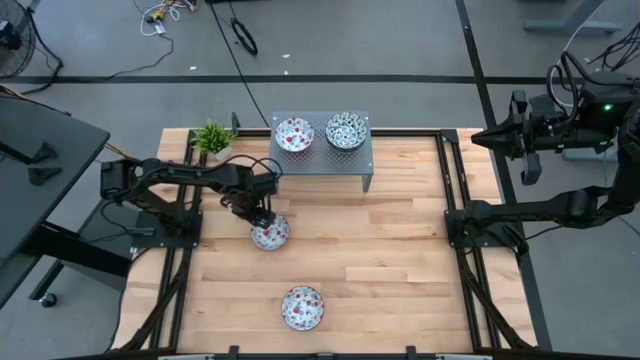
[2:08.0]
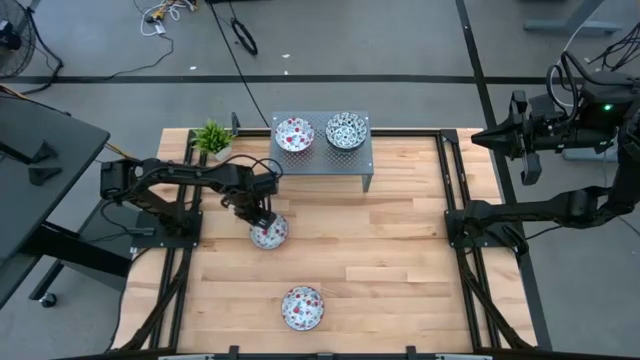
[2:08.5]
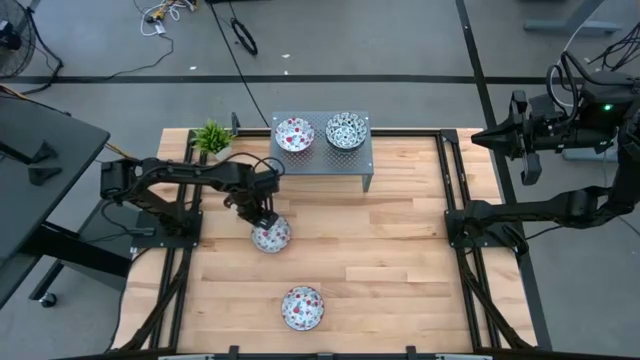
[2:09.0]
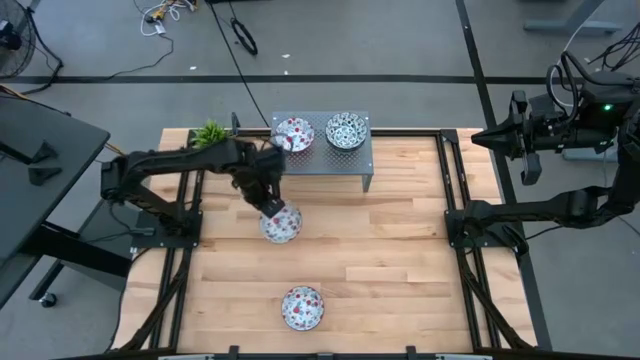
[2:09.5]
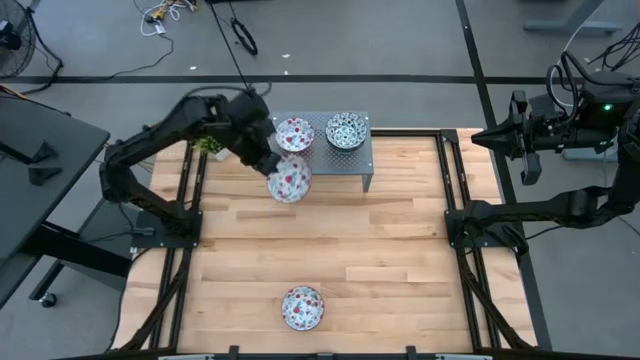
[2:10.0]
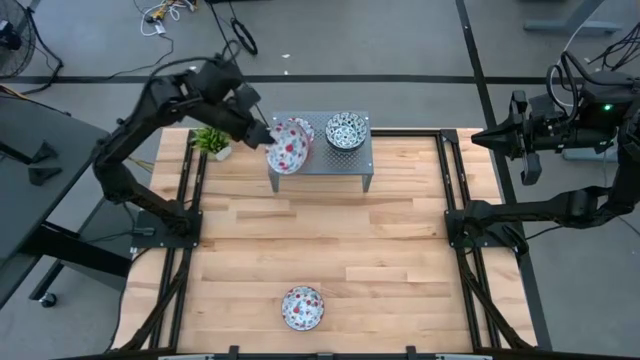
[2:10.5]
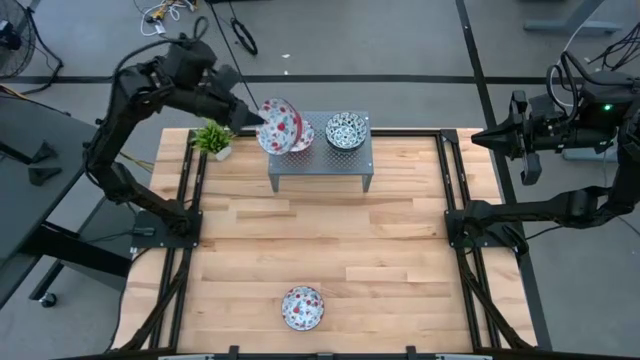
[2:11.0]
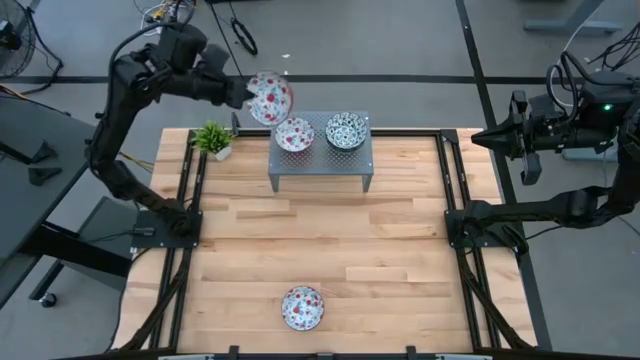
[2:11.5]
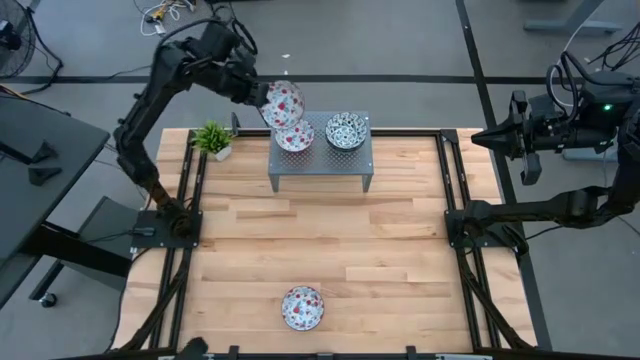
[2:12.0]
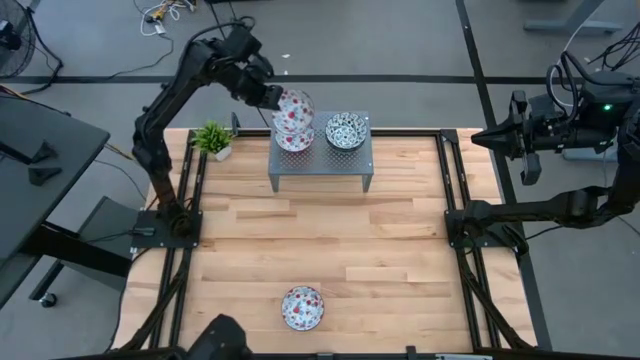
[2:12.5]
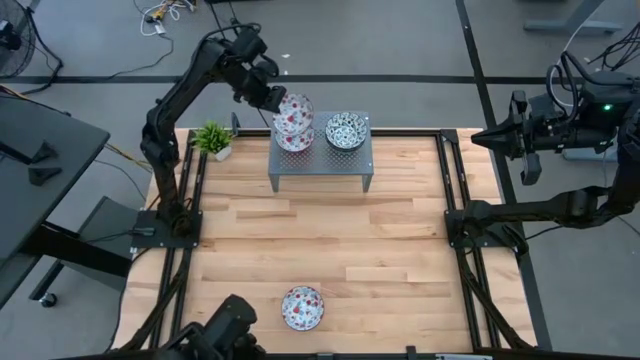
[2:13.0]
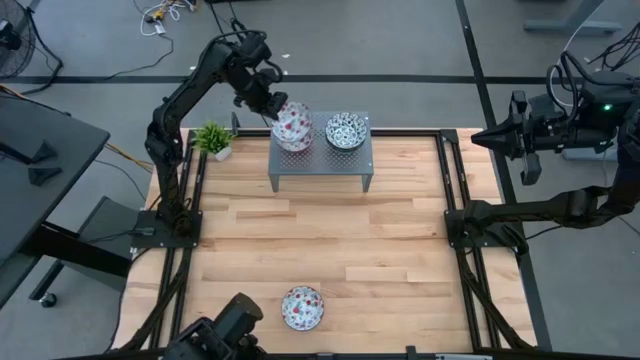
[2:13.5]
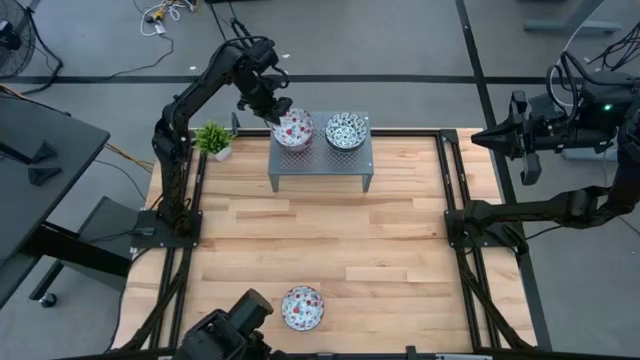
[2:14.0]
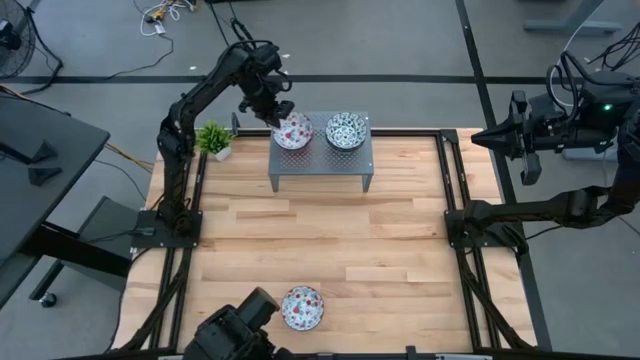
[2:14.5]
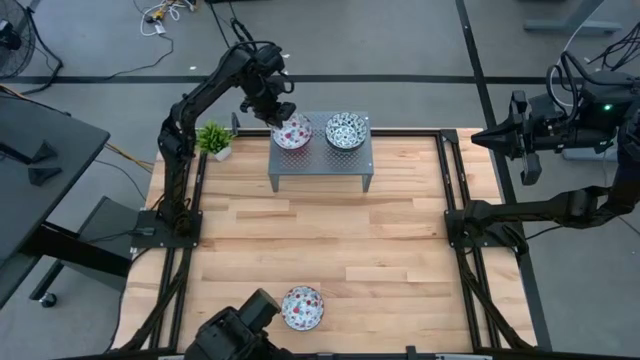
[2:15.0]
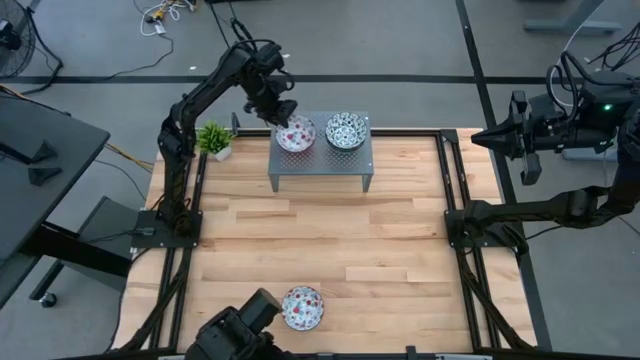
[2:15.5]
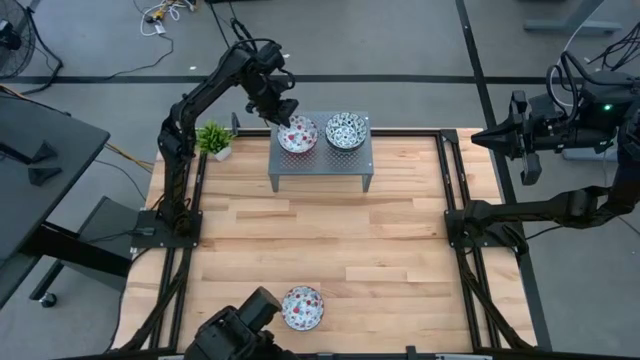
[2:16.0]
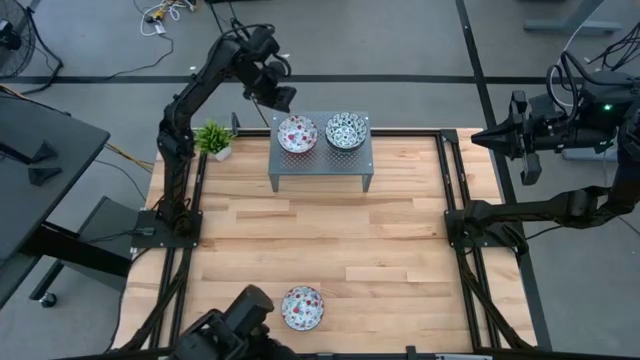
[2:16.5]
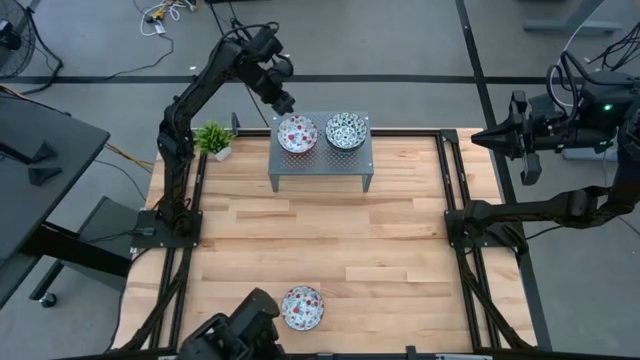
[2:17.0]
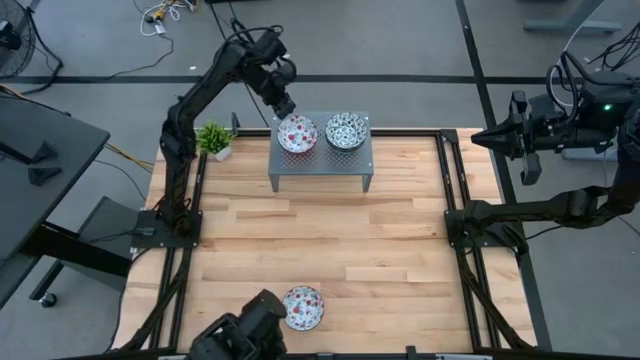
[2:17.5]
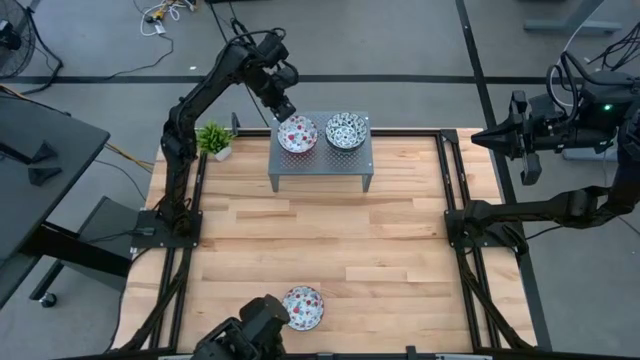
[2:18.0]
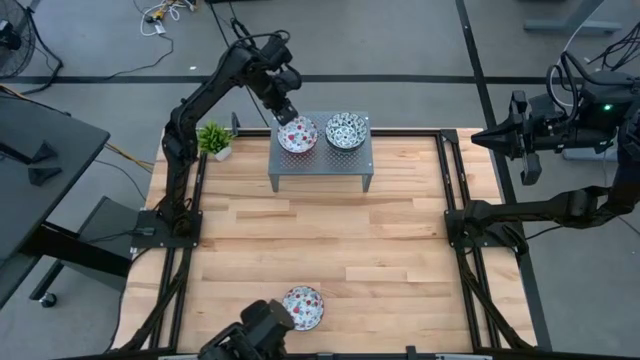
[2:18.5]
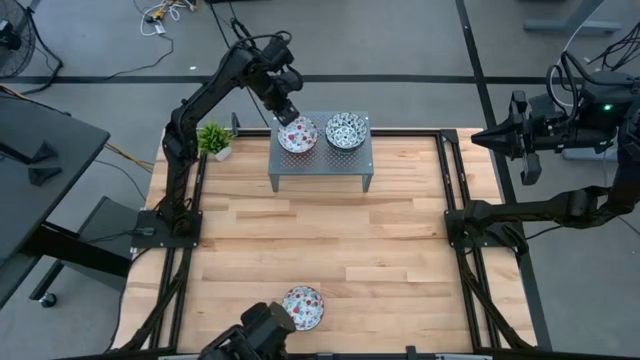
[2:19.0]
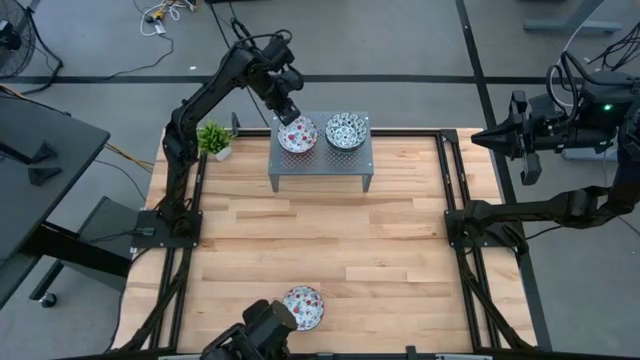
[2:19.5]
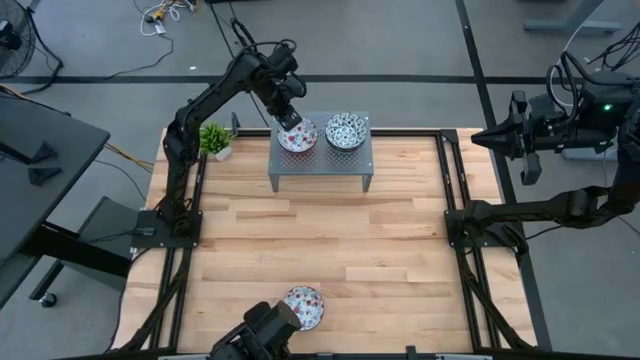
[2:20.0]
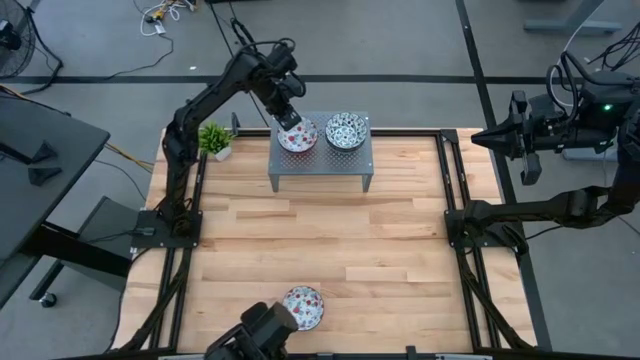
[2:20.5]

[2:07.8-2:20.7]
Task: Pick & Place Mini bowls
Stack the top red and white patterned bowl on top of the other red and white patterned bowl on the shelf

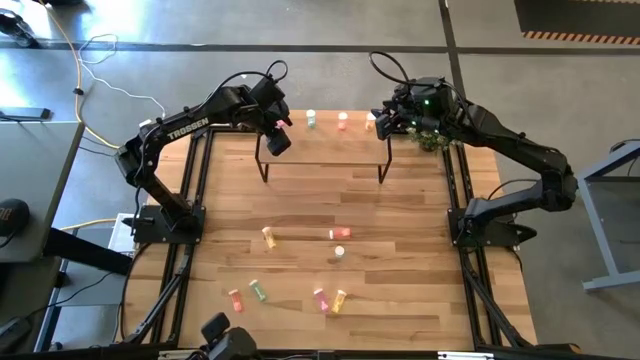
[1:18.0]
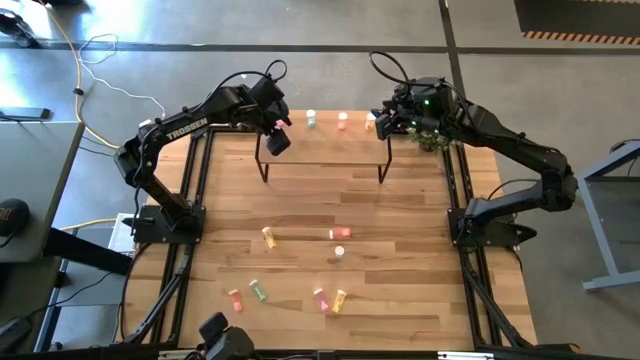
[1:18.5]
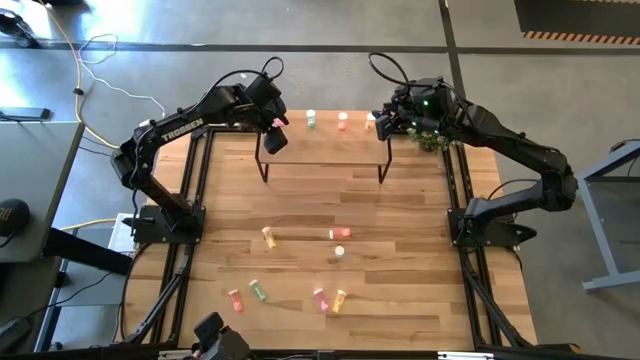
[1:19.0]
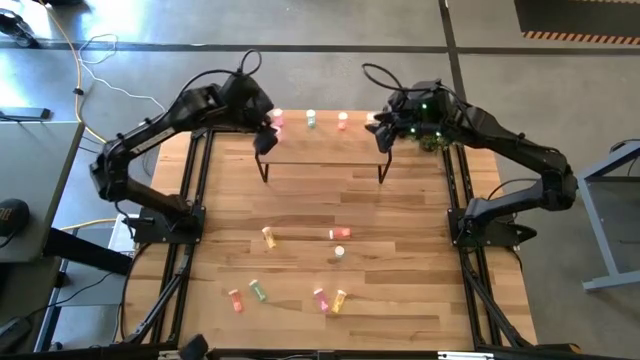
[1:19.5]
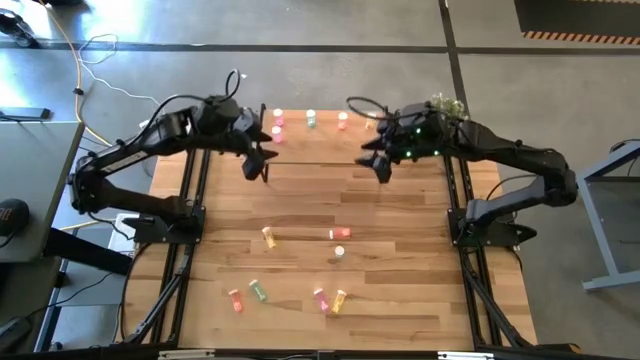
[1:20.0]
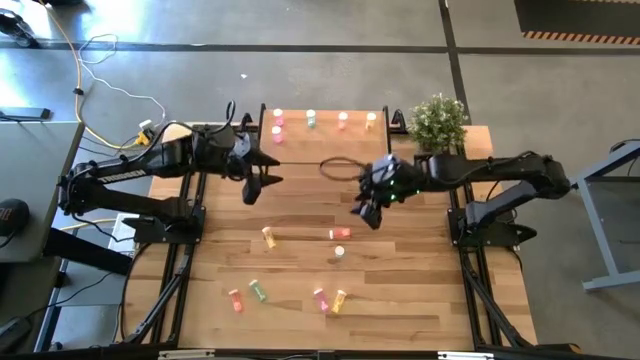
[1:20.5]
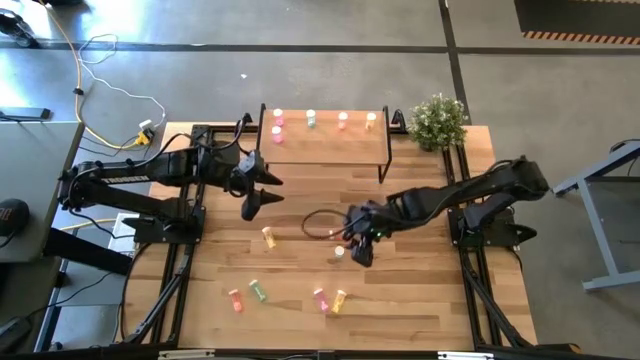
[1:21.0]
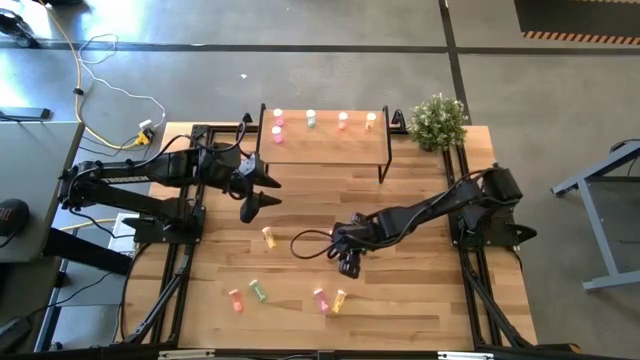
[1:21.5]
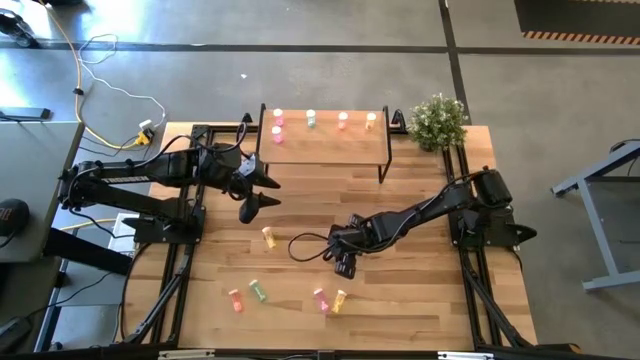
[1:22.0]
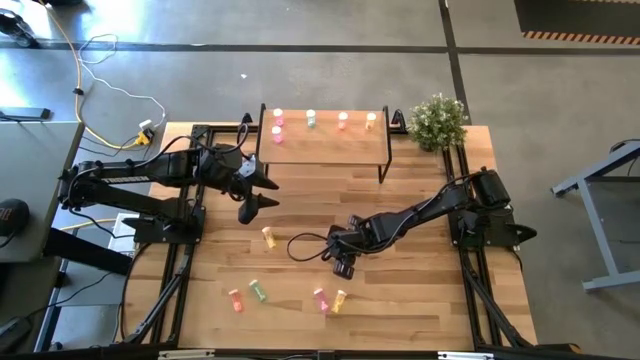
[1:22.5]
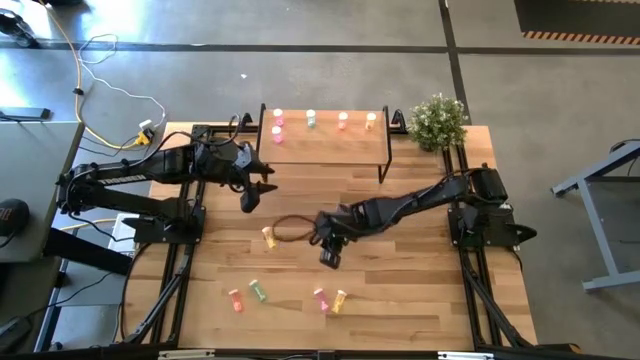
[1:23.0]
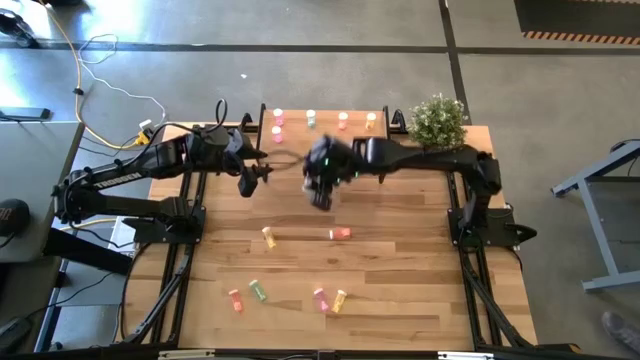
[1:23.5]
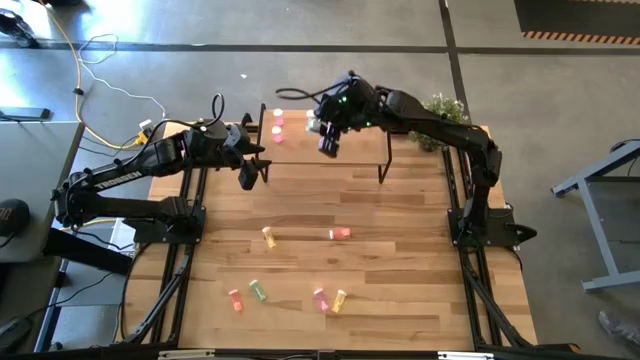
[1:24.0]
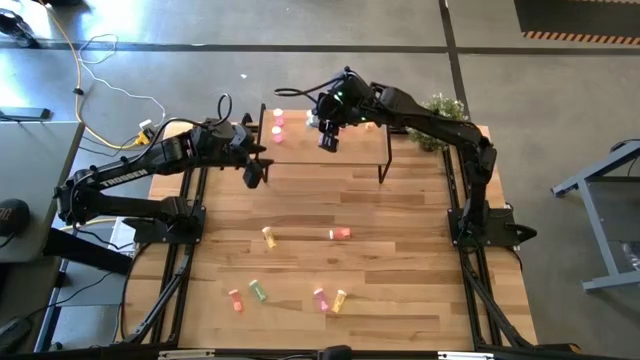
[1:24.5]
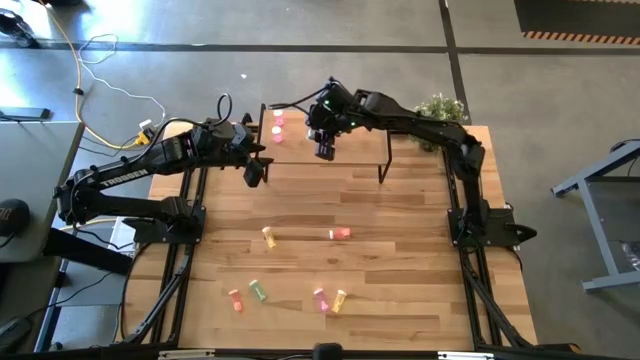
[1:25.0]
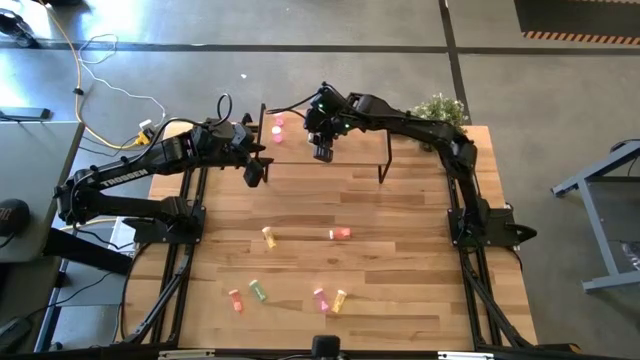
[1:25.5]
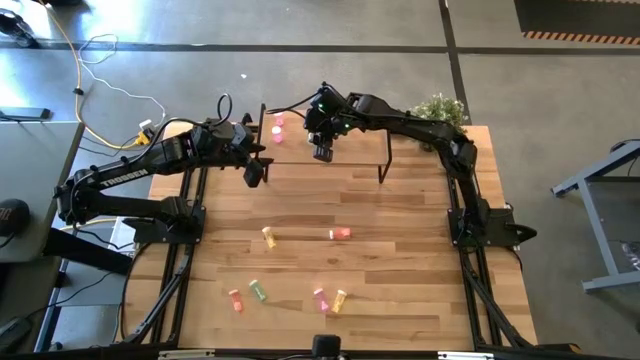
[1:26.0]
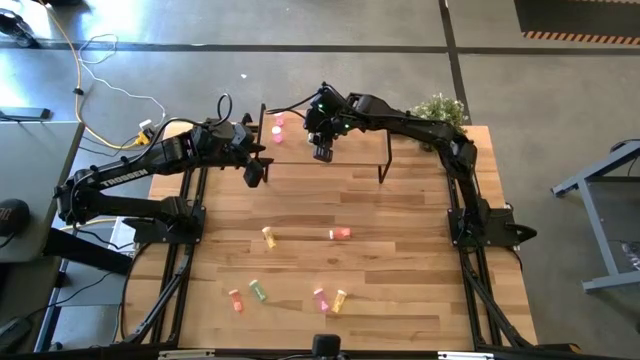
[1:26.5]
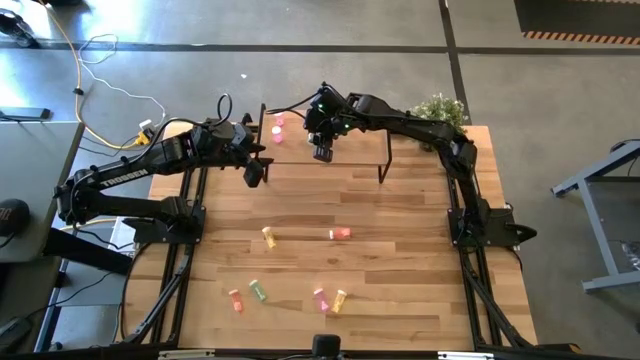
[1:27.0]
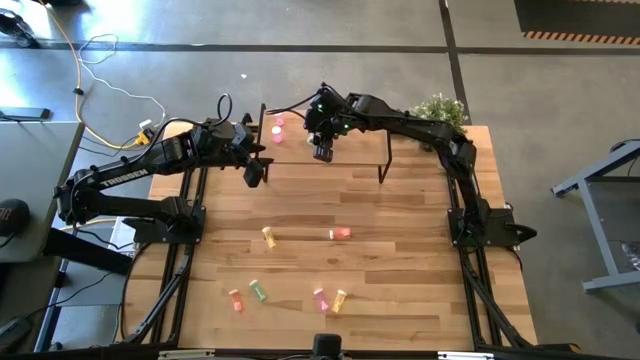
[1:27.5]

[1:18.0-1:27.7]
Task: Pick and place medicine bottles onto shelf by color
Put the top blue pill bottle on the shelf aligned with the other blue pill bottle
